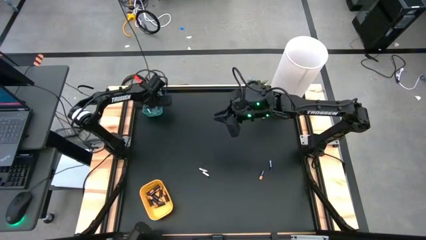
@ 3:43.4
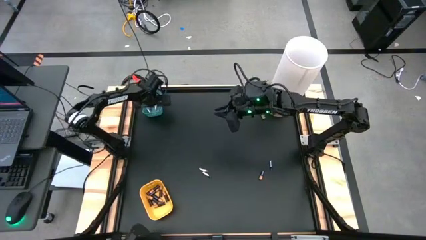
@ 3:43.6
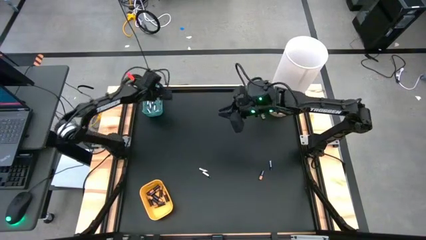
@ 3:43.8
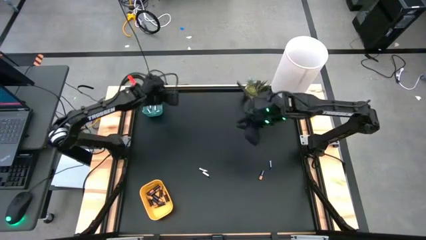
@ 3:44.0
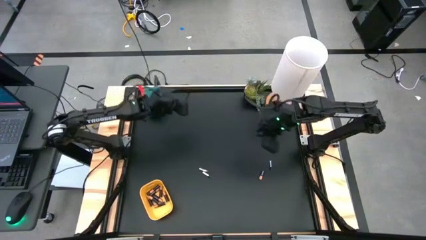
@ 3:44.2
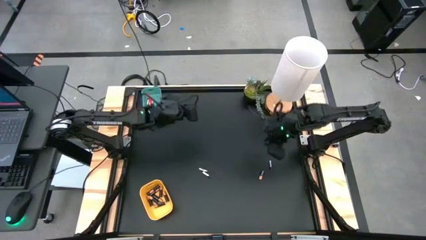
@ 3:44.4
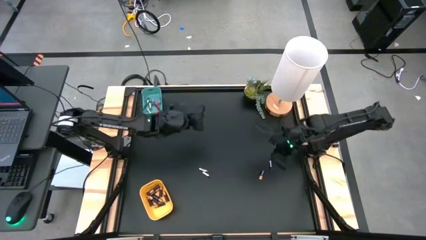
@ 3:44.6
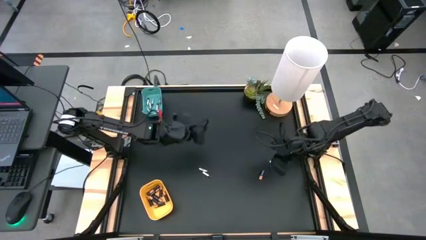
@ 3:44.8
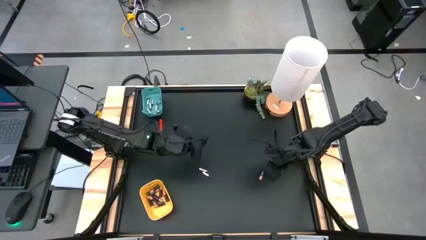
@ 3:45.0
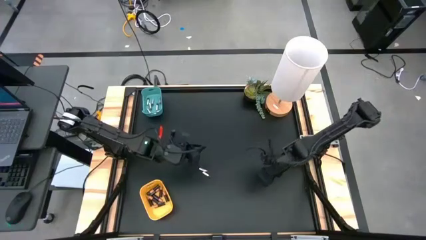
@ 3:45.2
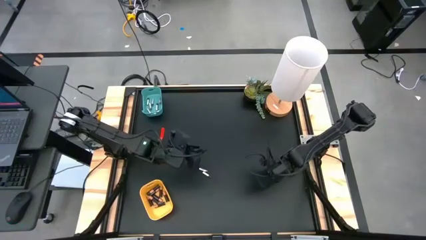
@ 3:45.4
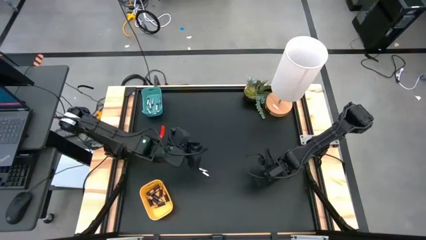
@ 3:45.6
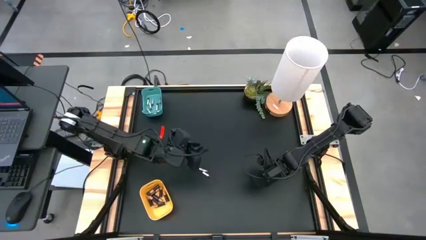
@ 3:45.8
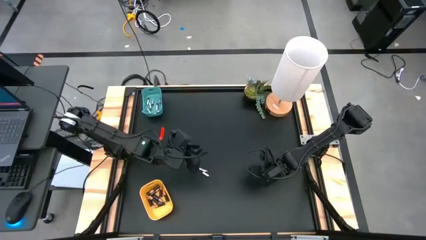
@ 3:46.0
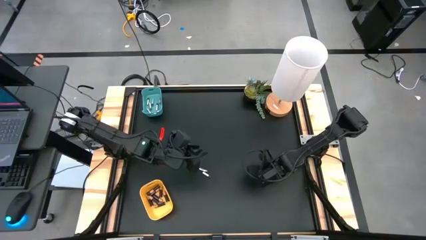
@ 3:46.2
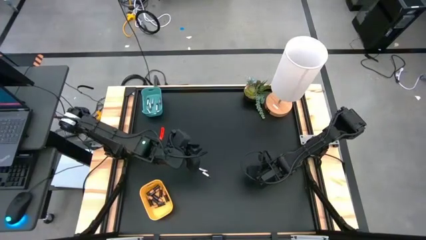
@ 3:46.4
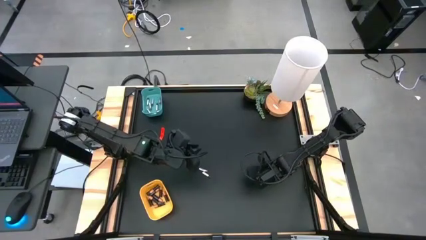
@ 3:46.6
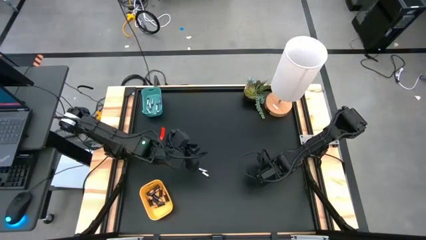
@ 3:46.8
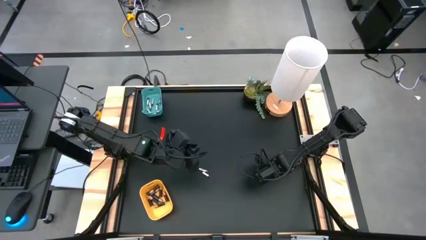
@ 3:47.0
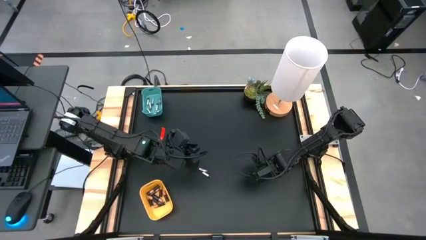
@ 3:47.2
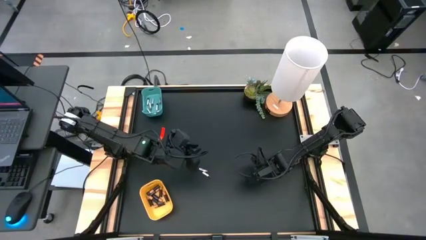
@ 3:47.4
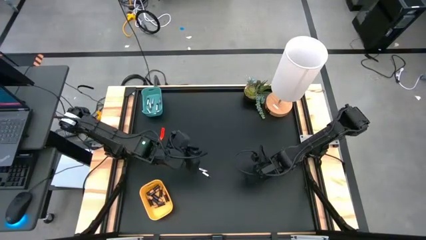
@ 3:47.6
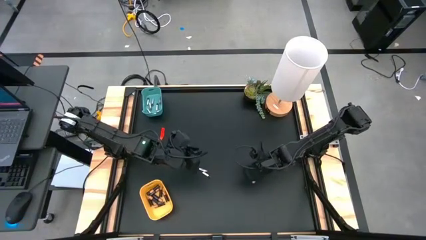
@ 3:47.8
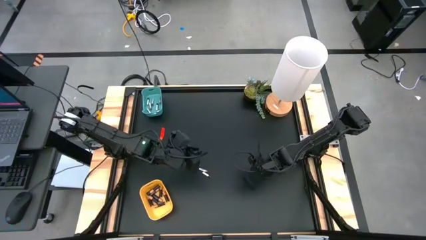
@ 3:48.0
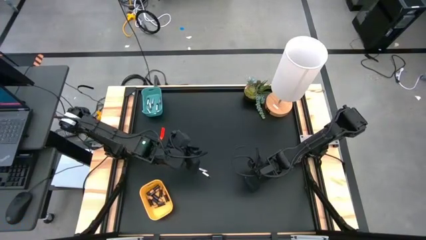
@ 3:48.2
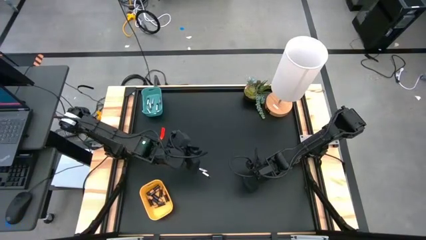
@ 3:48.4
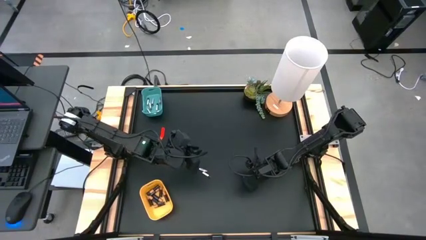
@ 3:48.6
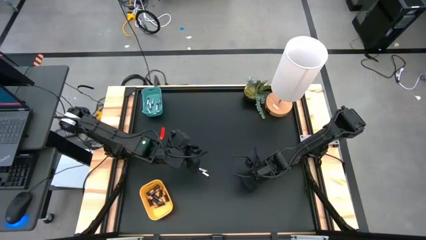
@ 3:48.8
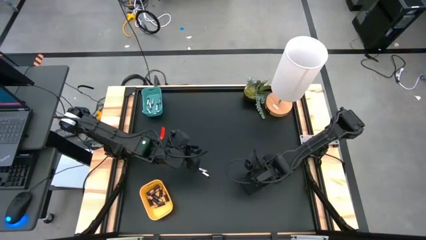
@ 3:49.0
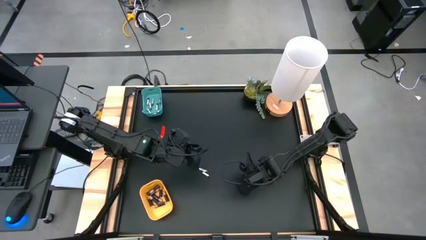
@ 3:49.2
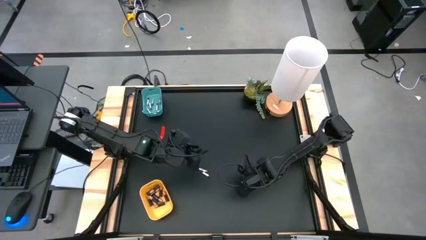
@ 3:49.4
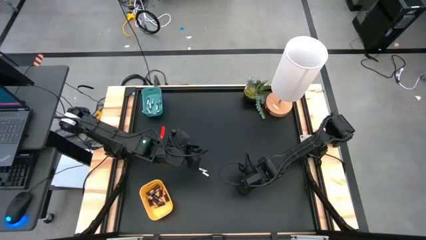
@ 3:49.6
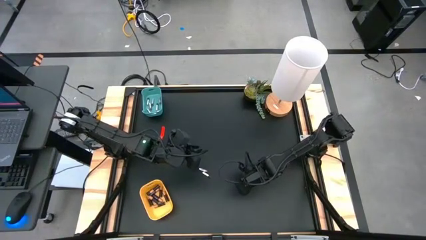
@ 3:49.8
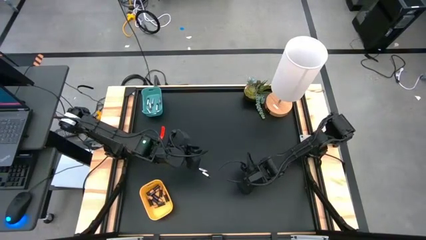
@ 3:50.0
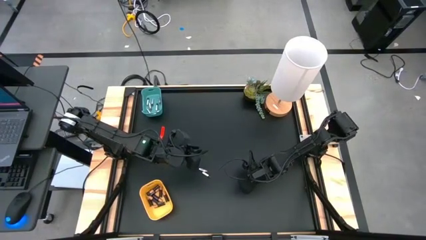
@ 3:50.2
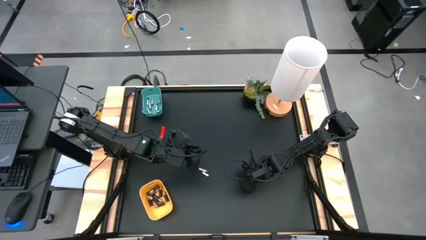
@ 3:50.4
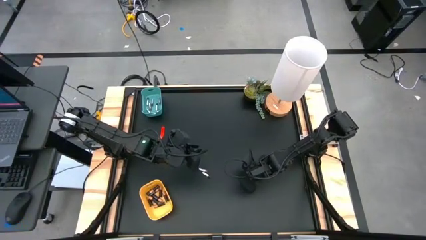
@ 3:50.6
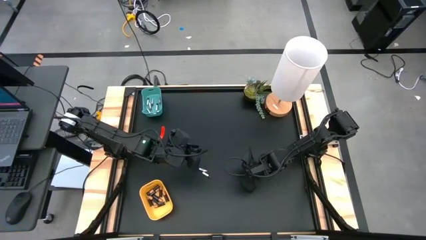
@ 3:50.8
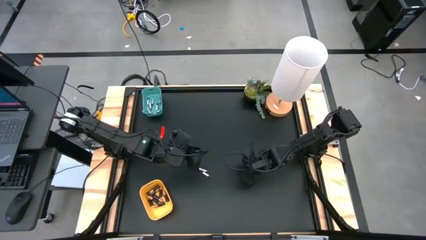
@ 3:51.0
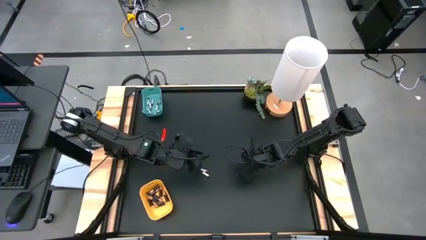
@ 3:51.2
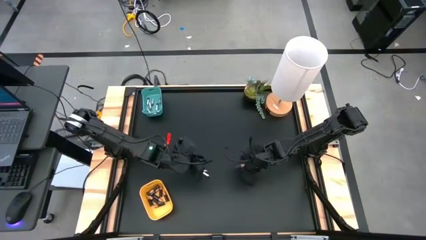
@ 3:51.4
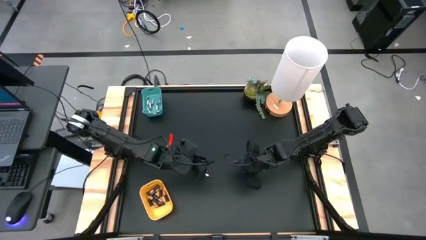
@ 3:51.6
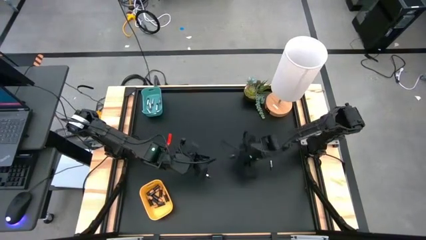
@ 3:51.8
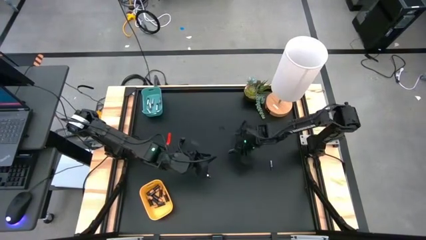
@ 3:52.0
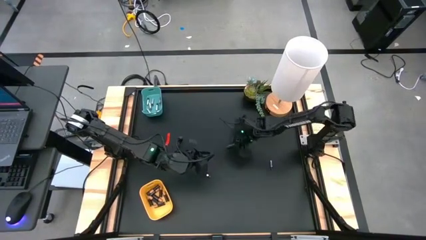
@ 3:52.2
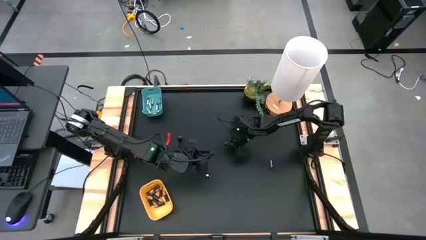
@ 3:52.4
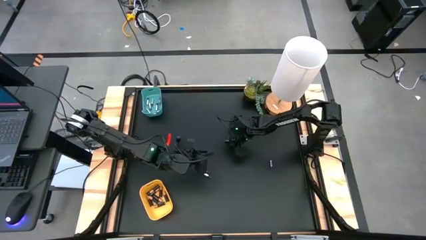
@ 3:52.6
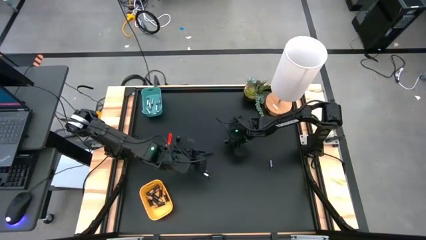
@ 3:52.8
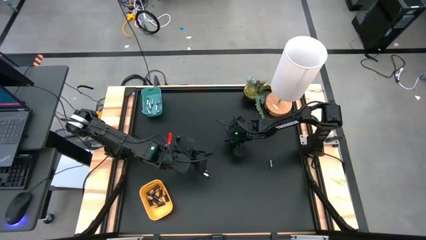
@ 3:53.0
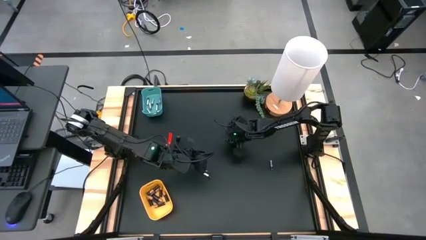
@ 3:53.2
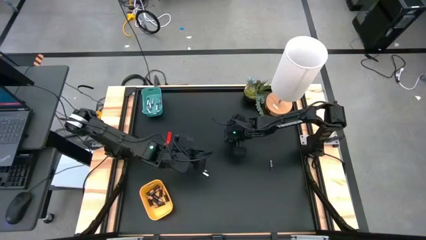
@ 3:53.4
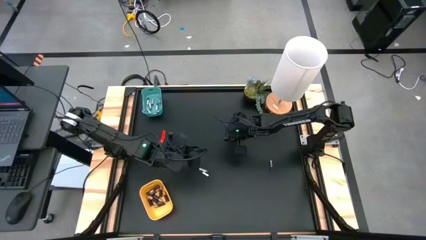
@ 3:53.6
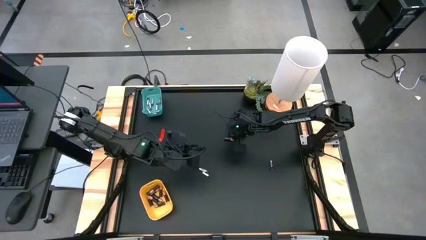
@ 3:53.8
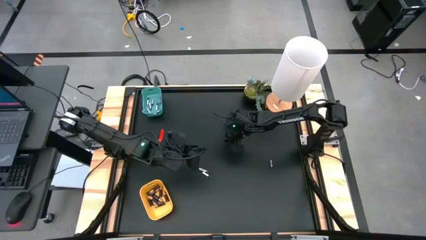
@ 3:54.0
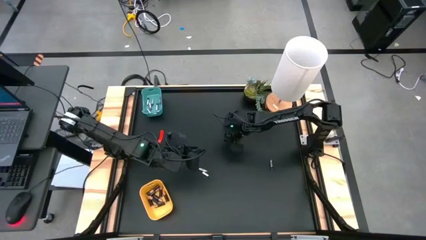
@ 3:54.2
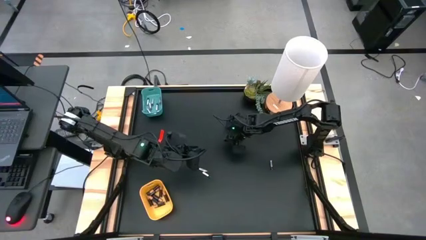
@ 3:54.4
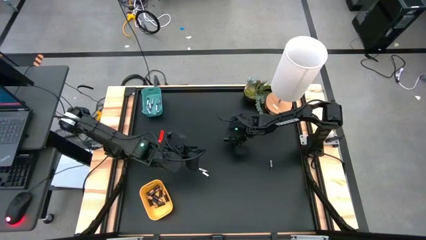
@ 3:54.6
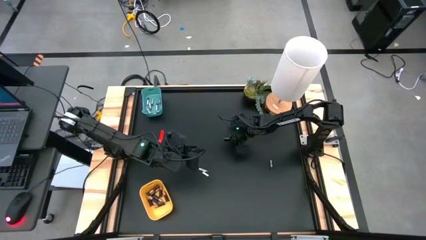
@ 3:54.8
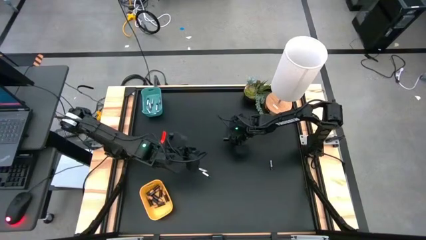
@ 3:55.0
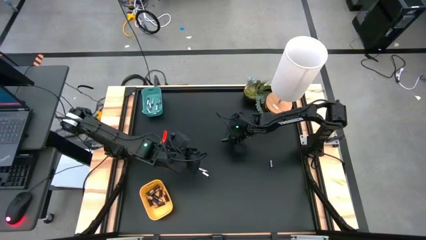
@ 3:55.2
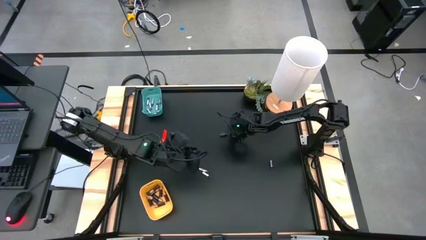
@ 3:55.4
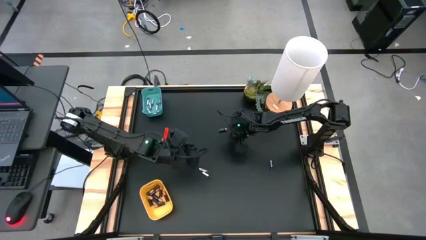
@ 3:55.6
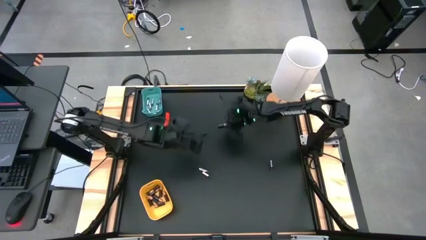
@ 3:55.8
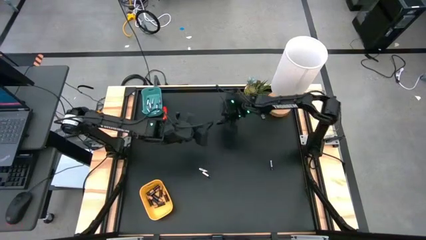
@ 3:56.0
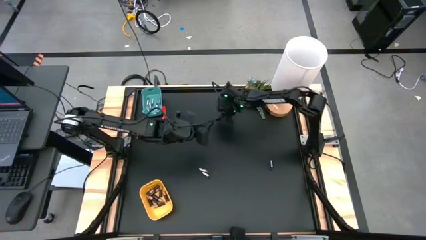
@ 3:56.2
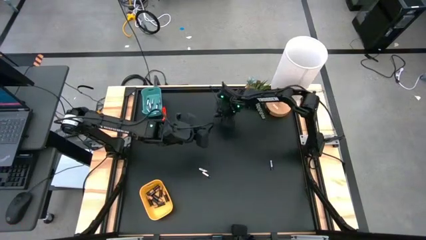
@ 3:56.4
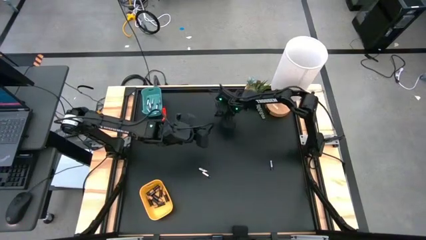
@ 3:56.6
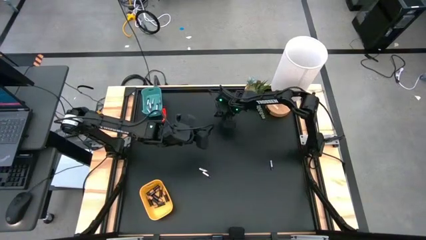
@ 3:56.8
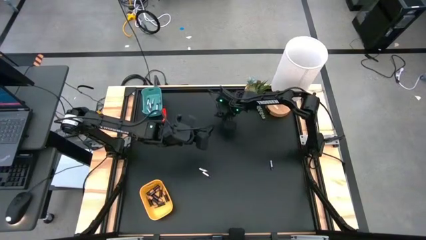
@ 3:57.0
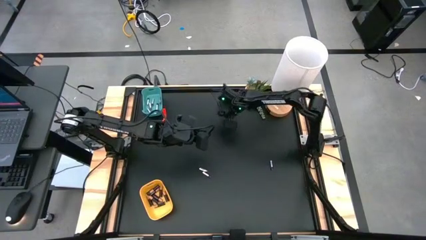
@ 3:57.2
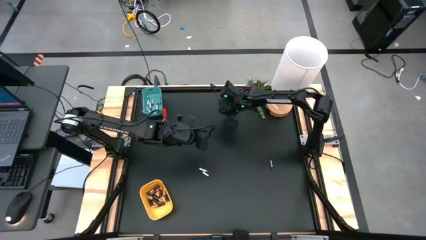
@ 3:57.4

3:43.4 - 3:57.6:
Task: Sort batteries
Put the black battery into the yellow bin

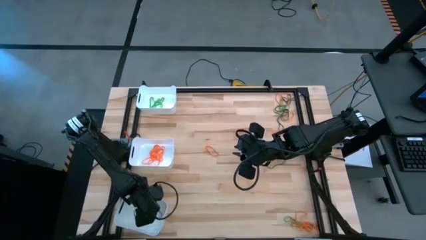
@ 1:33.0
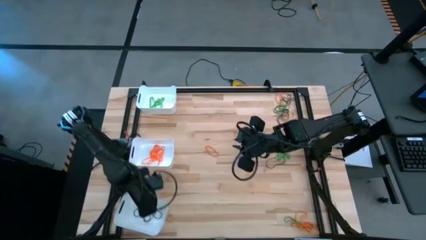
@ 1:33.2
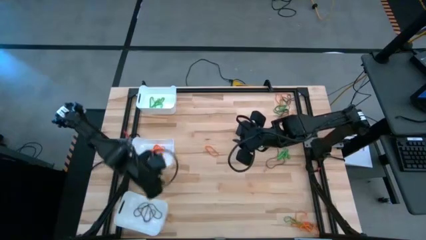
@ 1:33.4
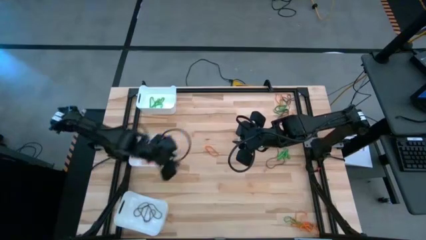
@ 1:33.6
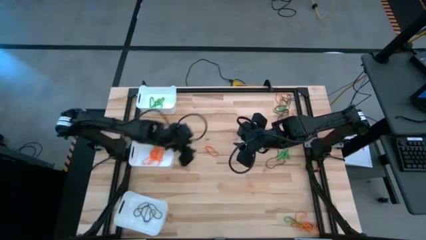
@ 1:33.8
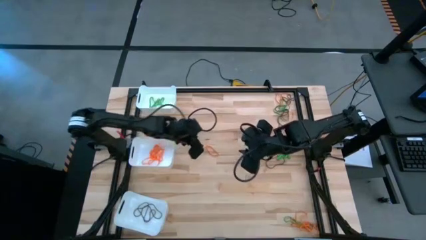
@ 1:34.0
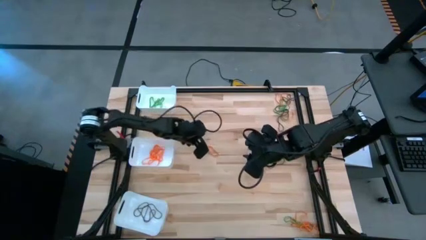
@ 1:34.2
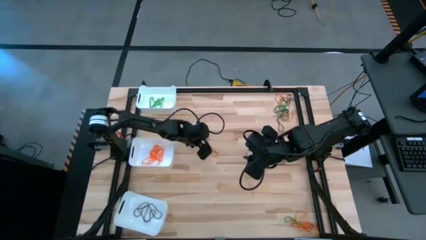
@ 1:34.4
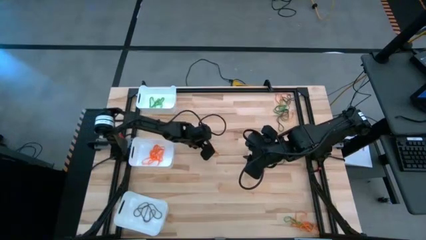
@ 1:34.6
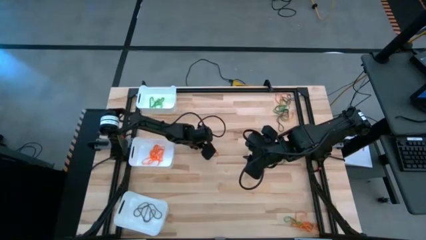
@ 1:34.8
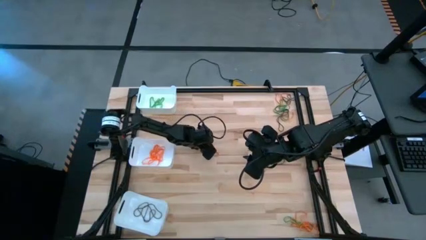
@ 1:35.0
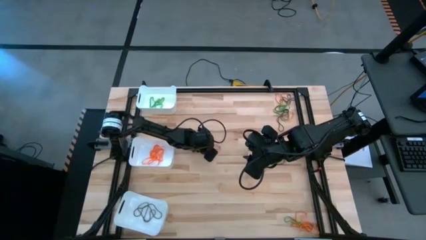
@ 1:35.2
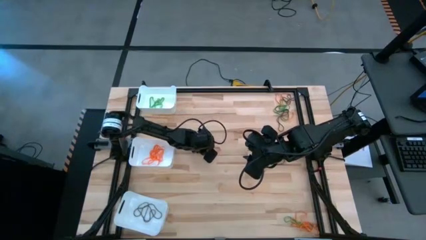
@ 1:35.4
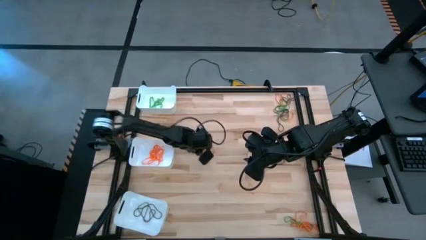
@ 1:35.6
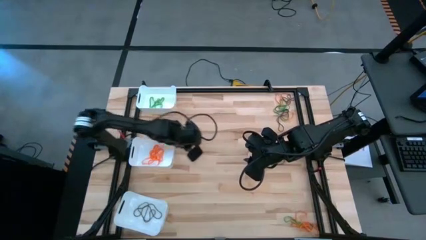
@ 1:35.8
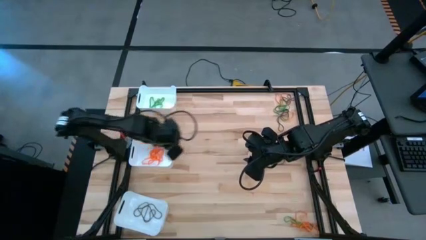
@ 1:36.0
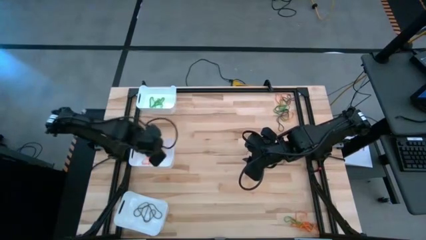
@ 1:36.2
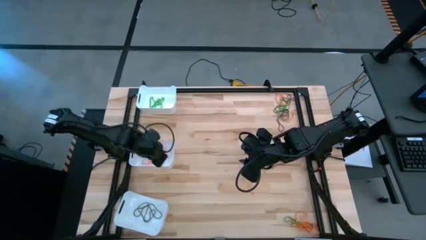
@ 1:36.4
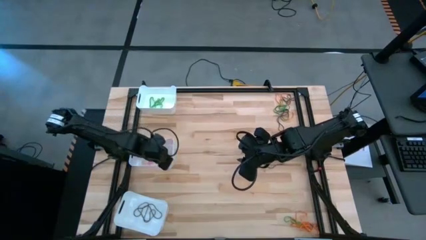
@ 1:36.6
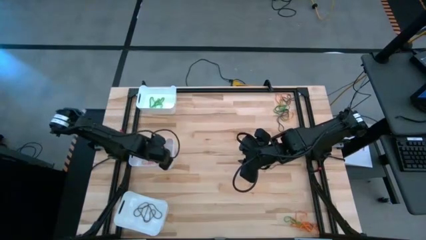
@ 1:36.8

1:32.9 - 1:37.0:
Task: Sort rubber bands into baskets
Put the orange rubber band into the middle white bin
